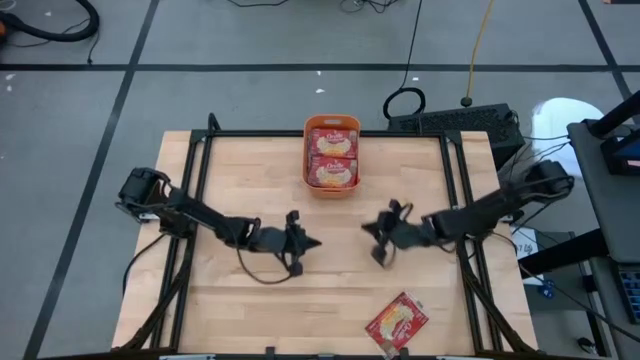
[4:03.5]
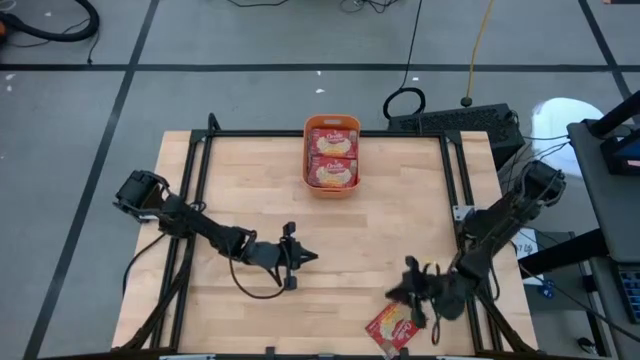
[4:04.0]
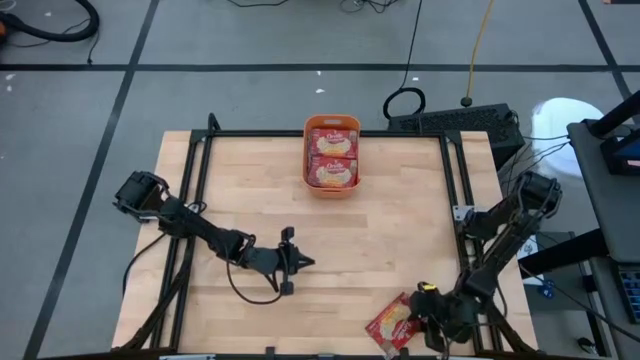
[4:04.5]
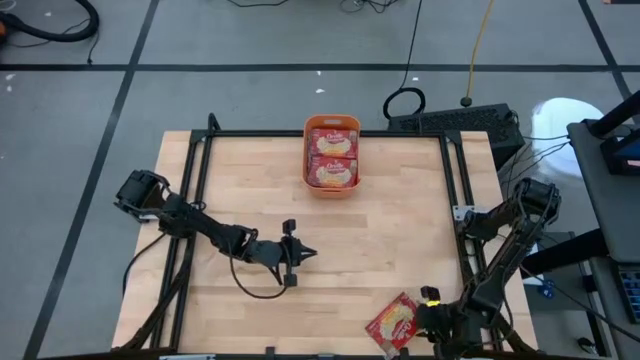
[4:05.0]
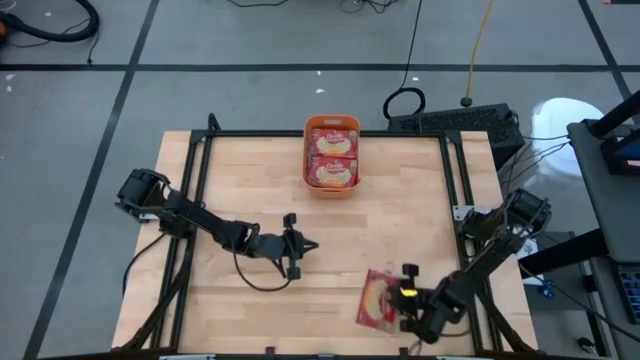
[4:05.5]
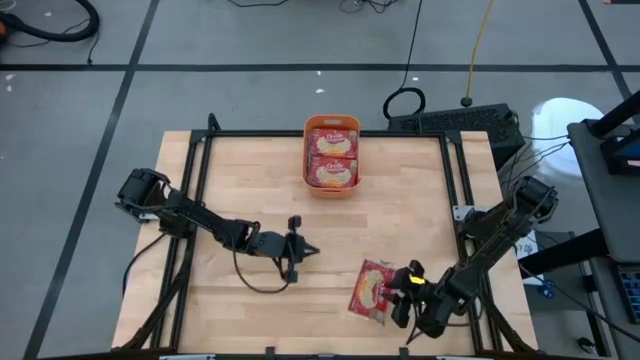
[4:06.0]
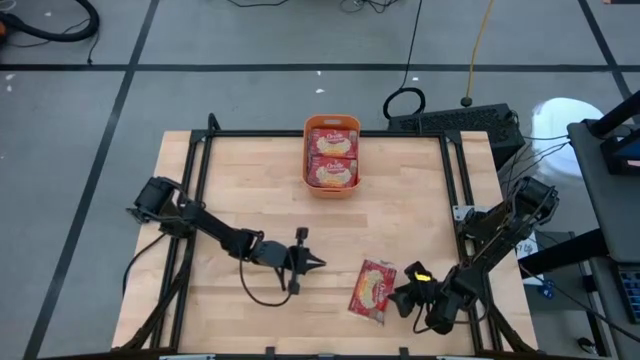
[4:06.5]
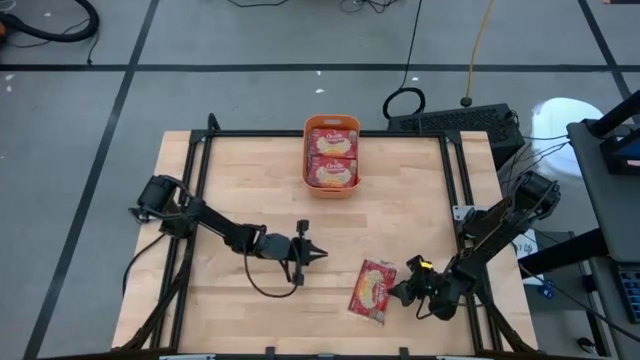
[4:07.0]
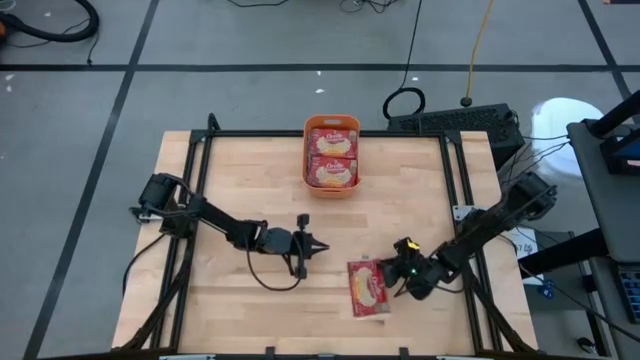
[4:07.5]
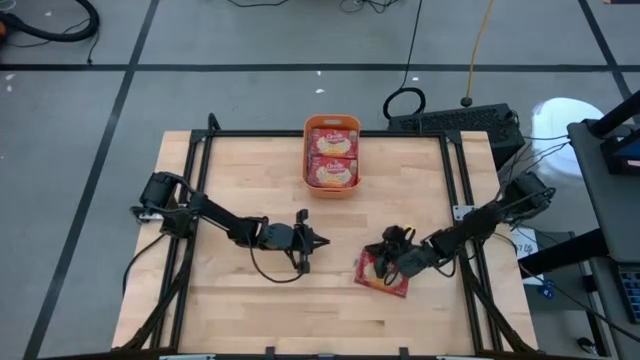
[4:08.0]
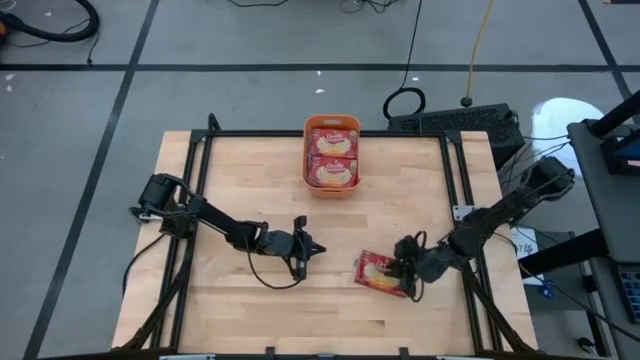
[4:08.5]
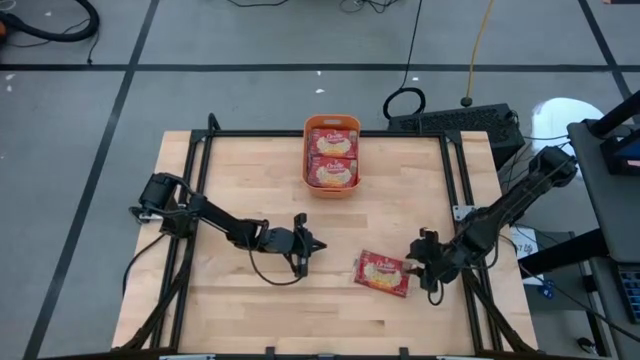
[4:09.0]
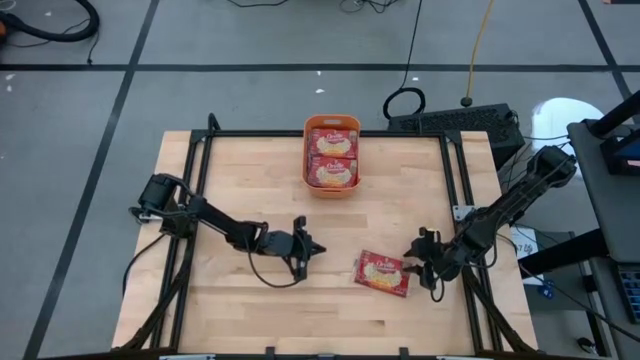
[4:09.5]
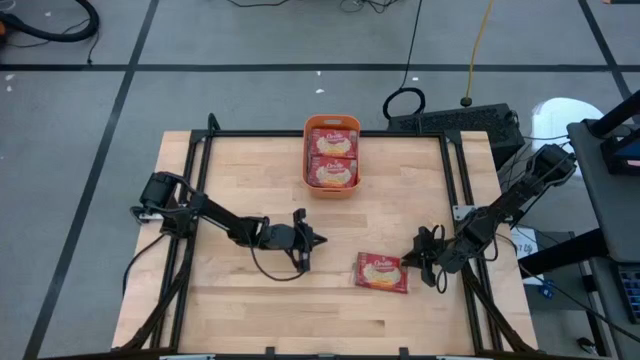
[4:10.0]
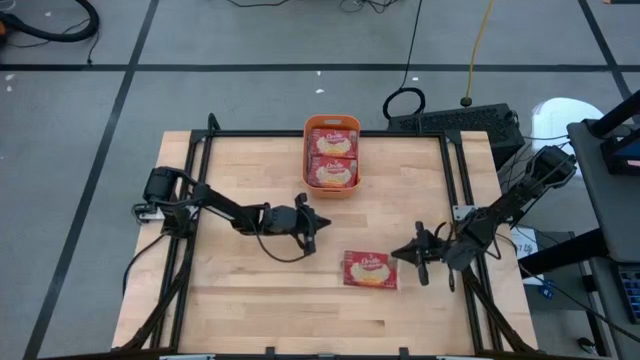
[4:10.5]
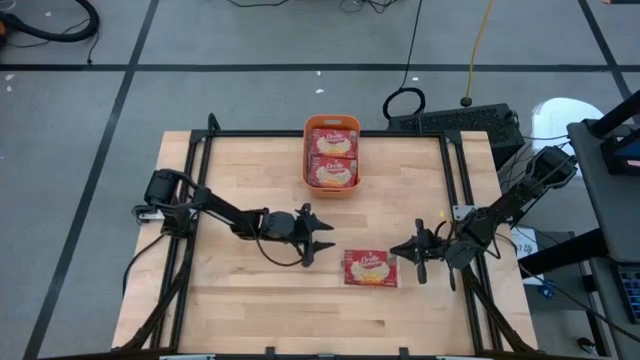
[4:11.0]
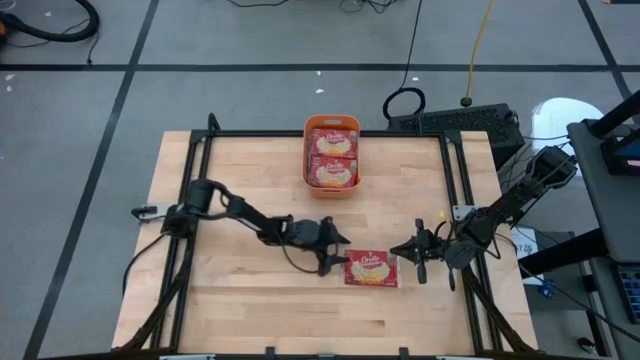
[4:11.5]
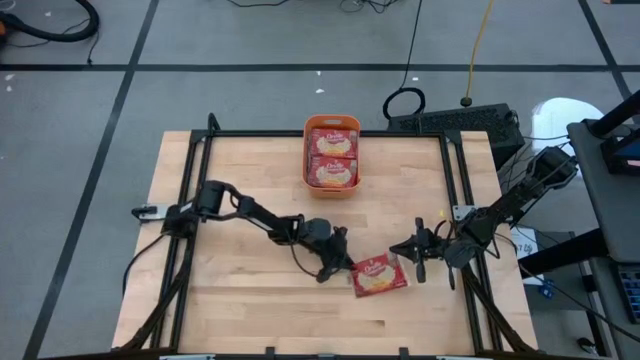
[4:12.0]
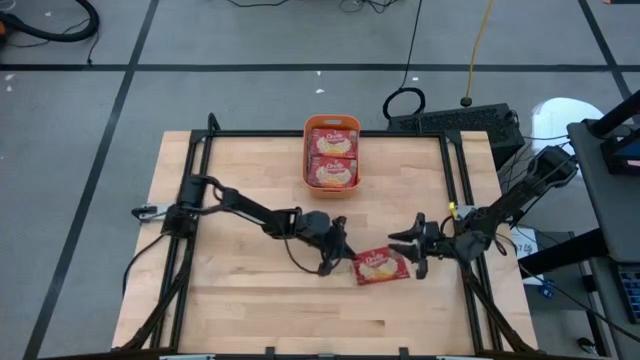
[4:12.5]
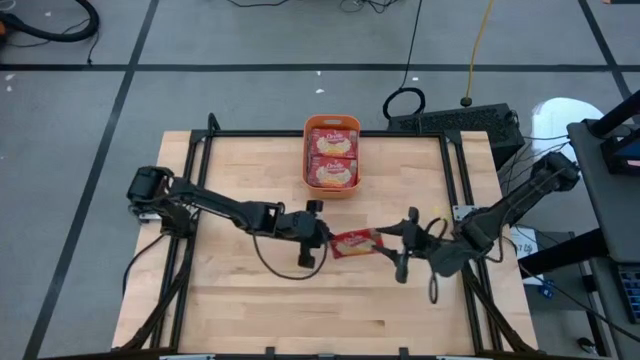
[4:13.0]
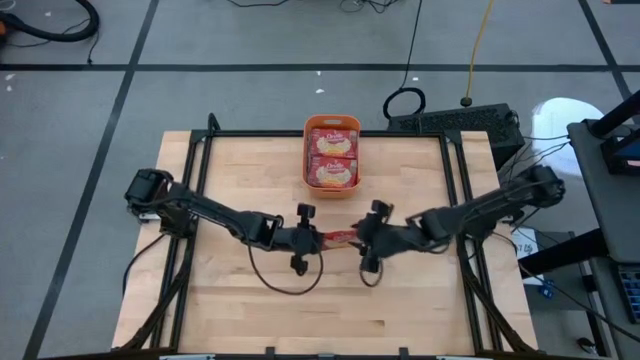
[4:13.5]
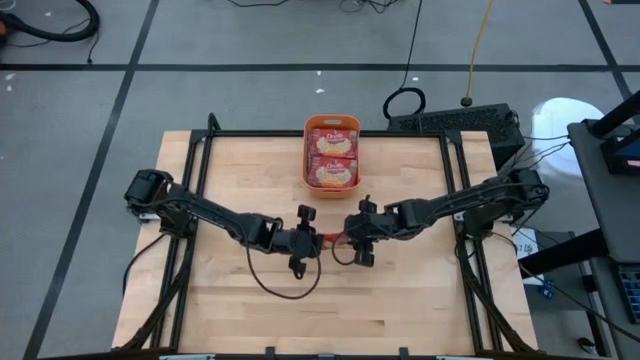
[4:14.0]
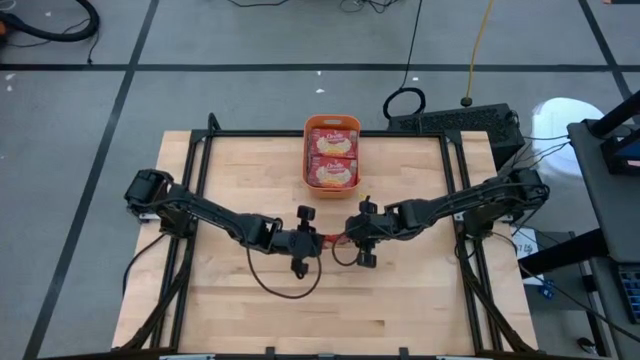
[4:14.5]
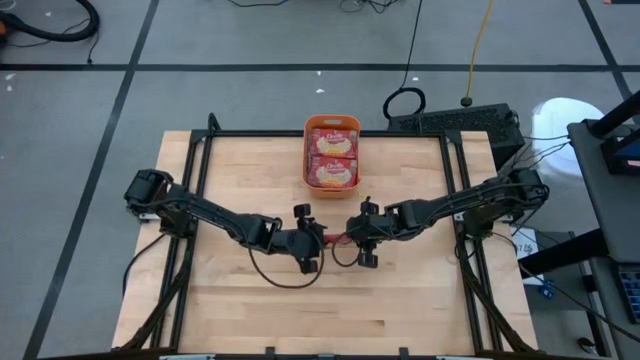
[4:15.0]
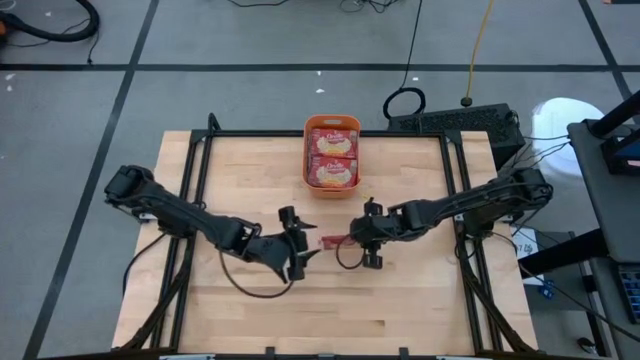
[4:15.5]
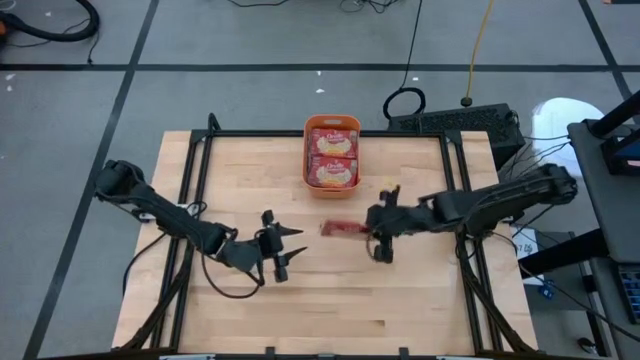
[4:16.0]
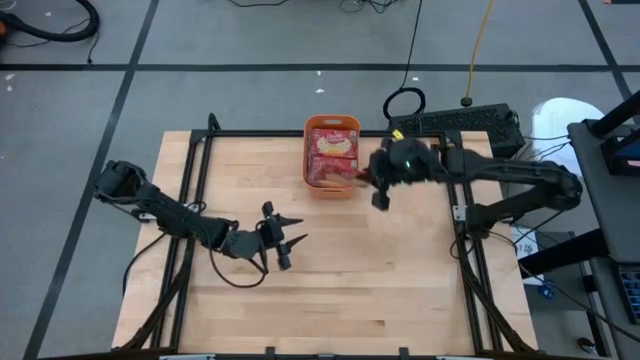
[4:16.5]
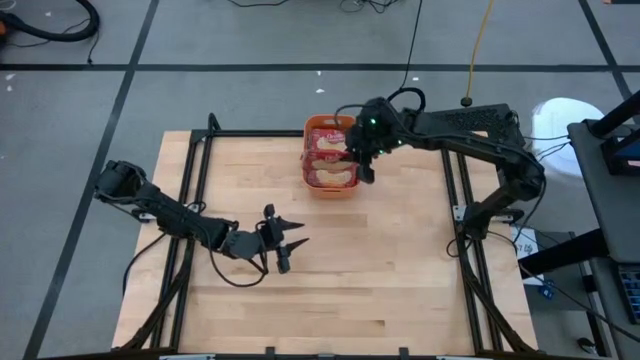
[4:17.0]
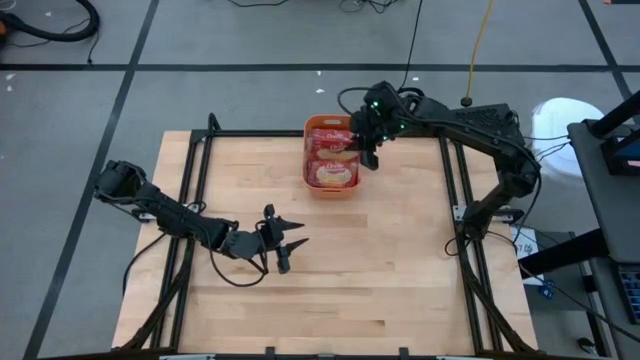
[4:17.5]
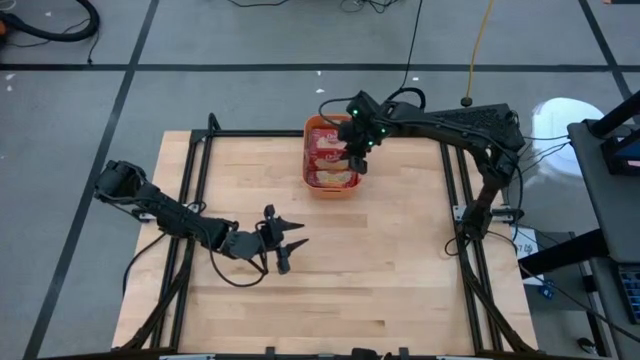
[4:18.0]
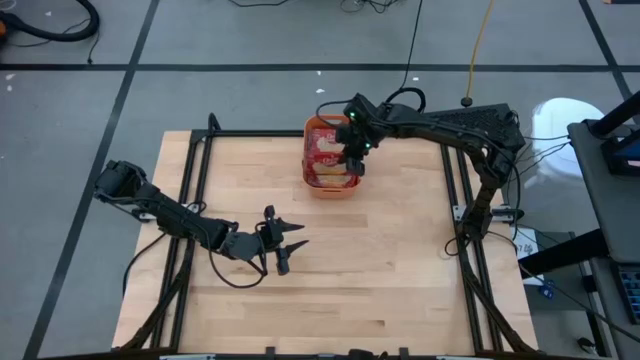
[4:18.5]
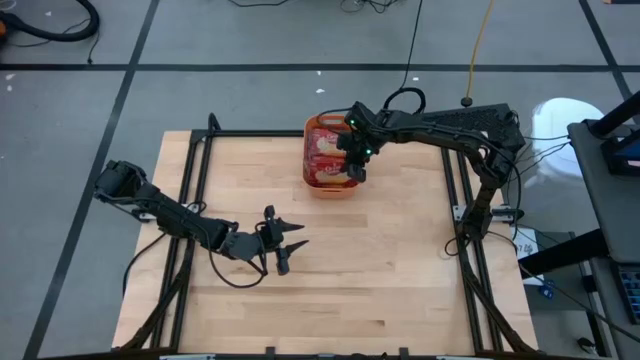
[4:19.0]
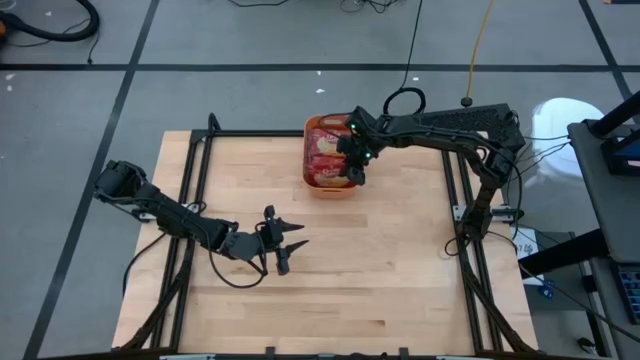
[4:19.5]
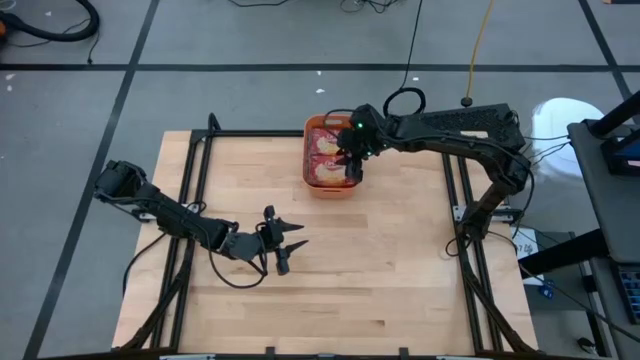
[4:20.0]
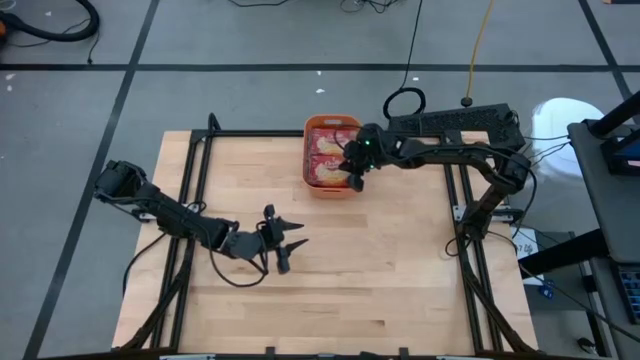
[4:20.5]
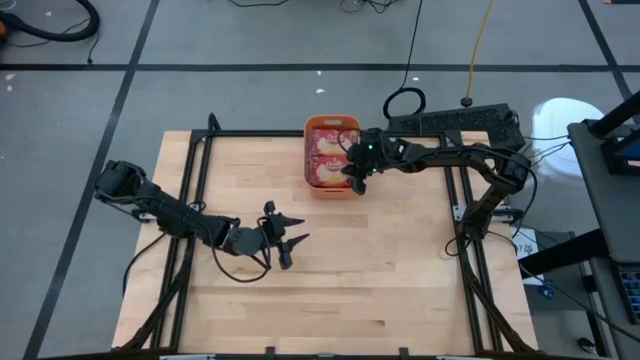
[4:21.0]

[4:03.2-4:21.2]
Task: Sort popcorn bags into baskets
Put the red popcorn bag into the orange bin

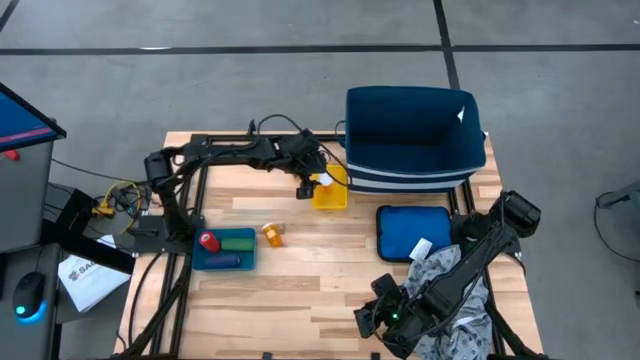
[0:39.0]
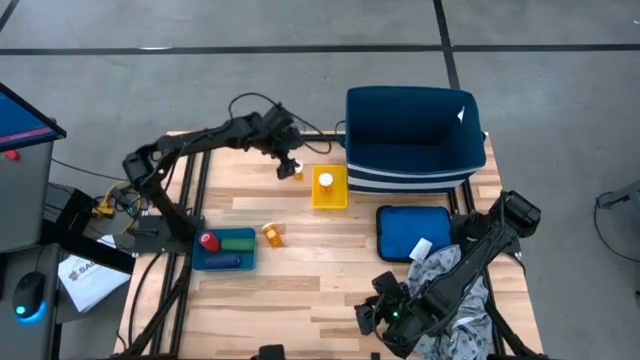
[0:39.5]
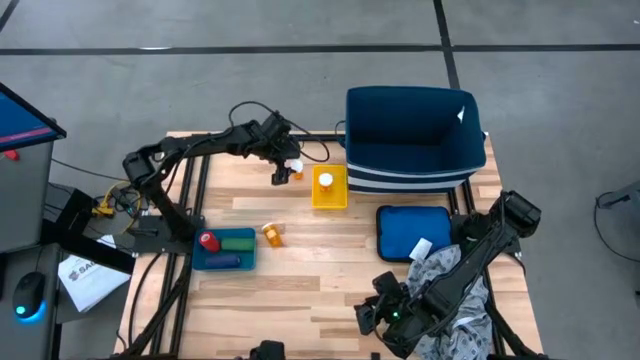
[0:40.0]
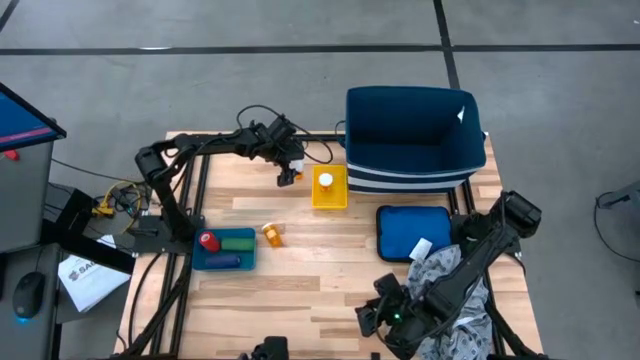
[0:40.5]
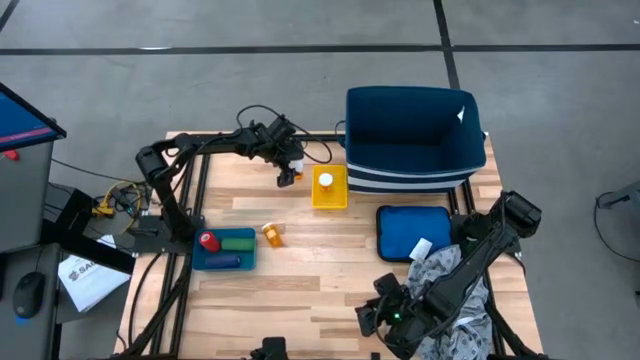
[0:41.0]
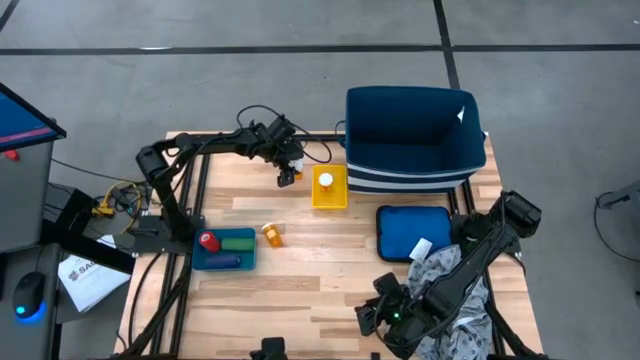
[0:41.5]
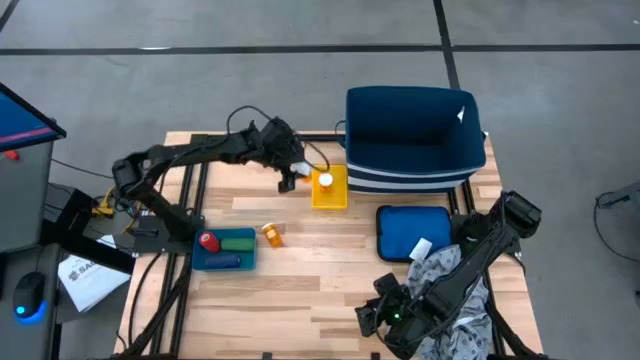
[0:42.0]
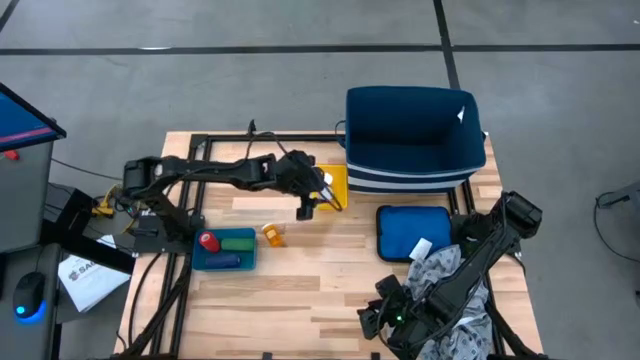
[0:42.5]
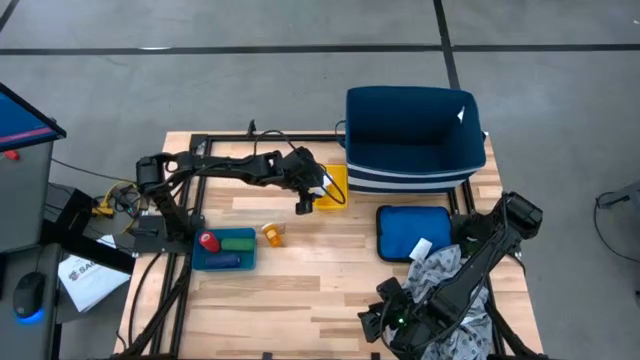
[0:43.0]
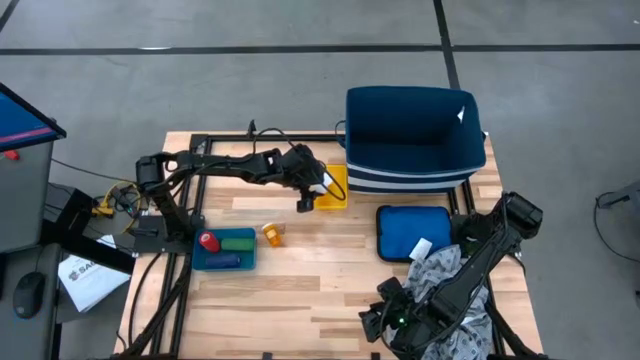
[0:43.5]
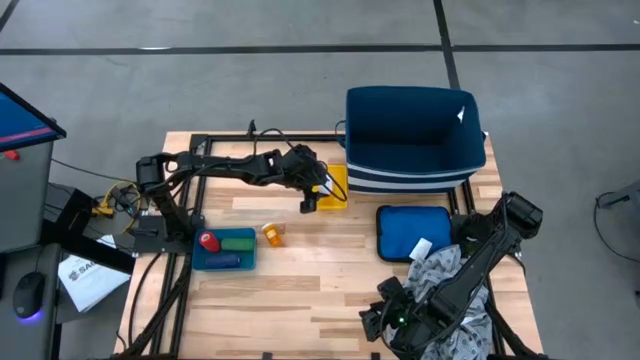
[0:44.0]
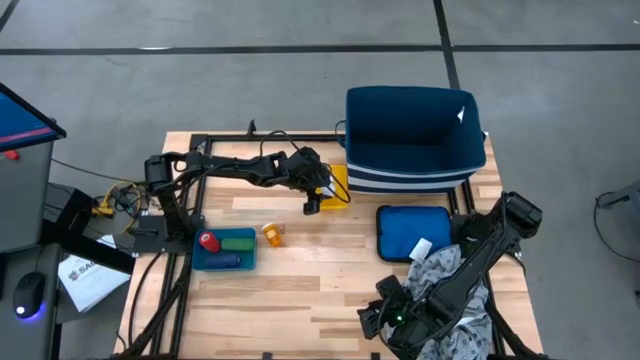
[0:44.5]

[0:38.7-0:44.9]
Task: Pick & place medical supplies in basket/bin
Put the top orange pill bottle into the yellow bin
